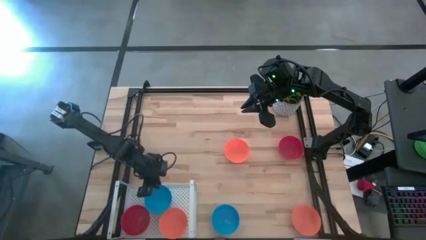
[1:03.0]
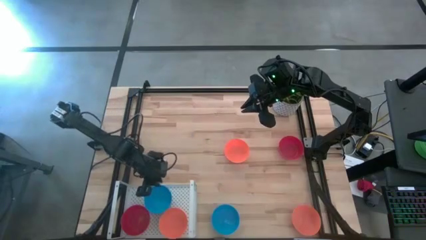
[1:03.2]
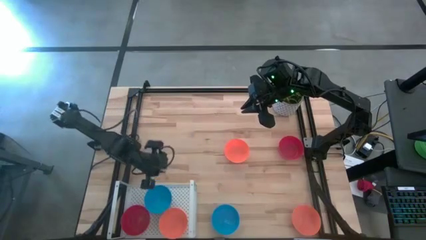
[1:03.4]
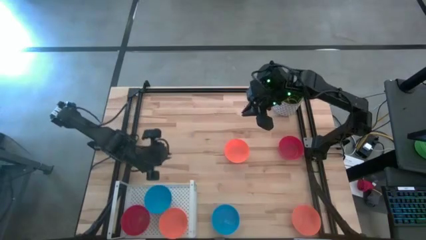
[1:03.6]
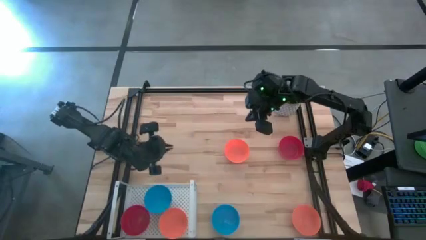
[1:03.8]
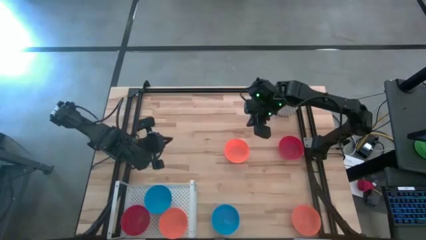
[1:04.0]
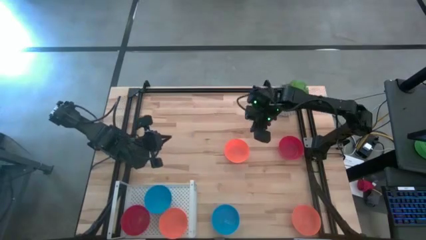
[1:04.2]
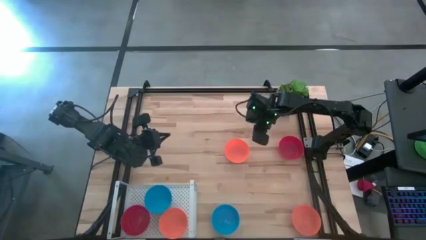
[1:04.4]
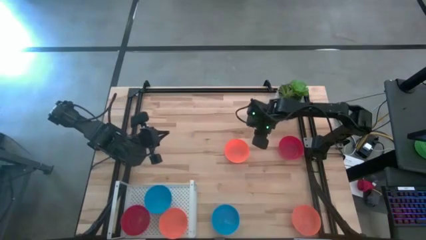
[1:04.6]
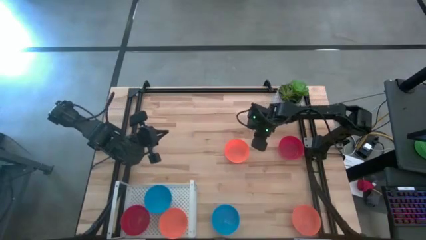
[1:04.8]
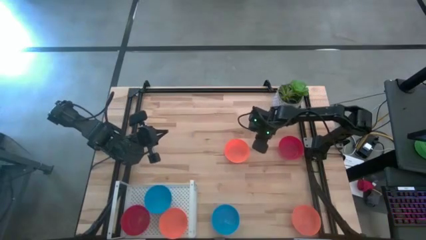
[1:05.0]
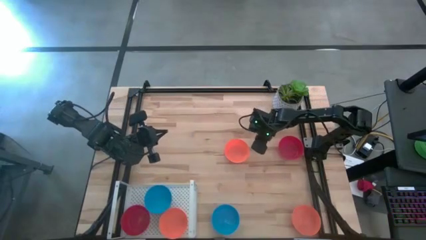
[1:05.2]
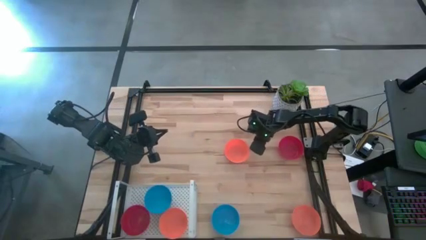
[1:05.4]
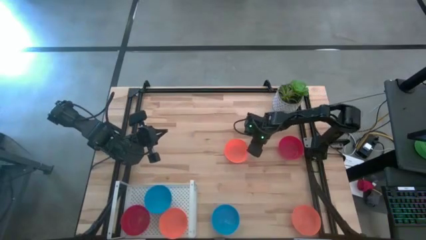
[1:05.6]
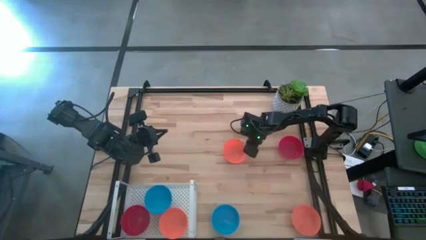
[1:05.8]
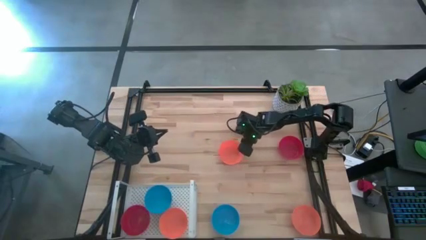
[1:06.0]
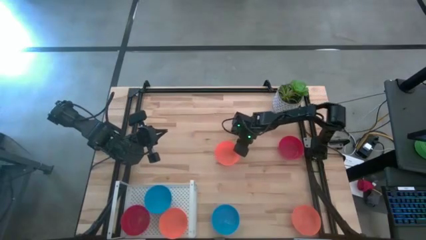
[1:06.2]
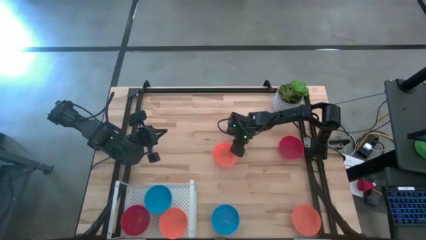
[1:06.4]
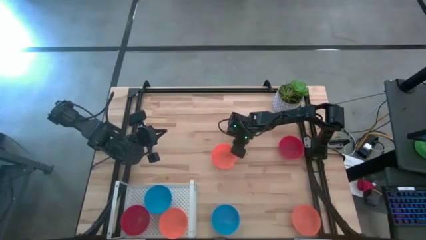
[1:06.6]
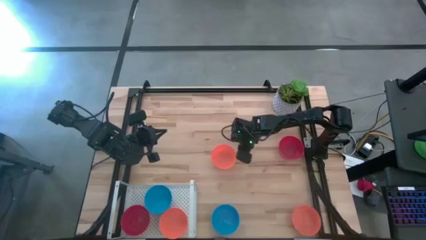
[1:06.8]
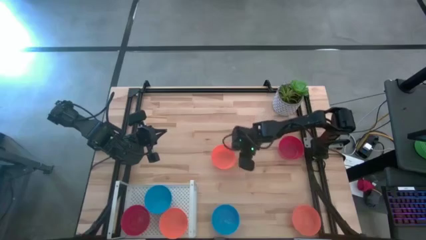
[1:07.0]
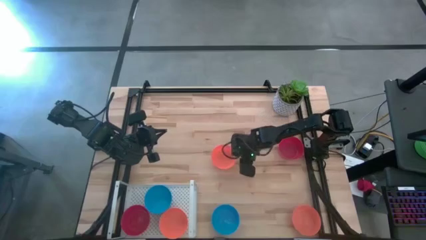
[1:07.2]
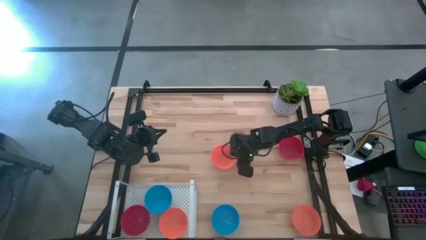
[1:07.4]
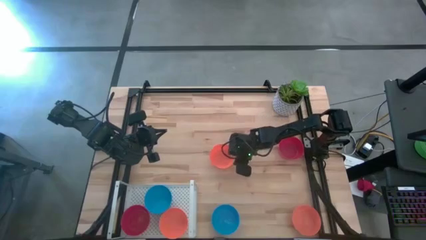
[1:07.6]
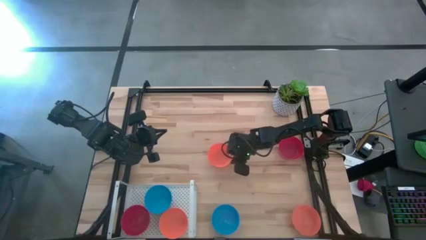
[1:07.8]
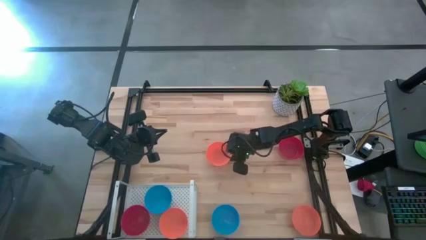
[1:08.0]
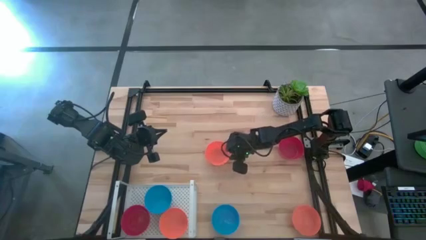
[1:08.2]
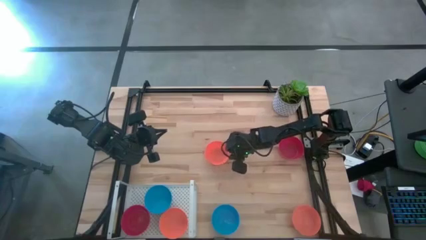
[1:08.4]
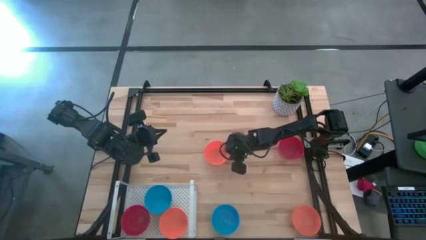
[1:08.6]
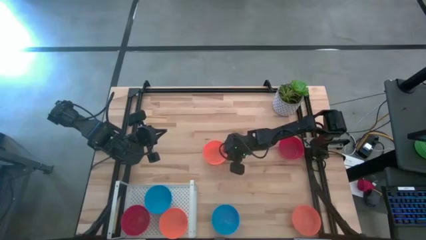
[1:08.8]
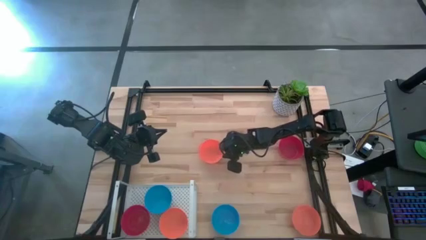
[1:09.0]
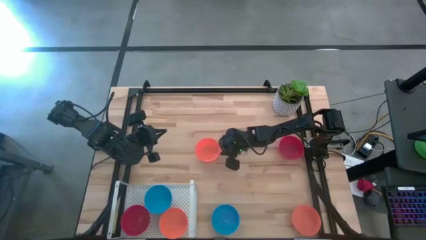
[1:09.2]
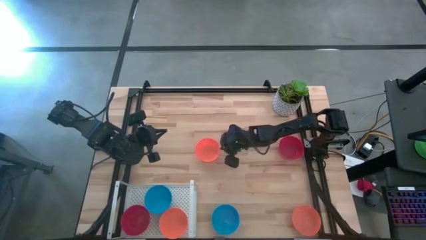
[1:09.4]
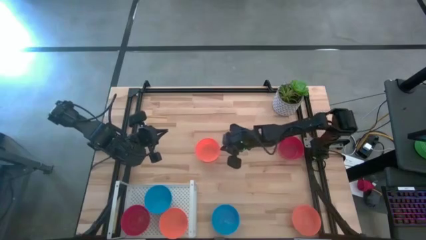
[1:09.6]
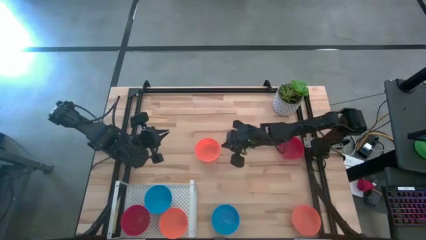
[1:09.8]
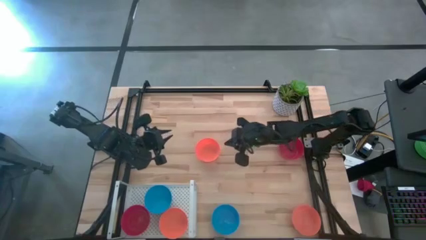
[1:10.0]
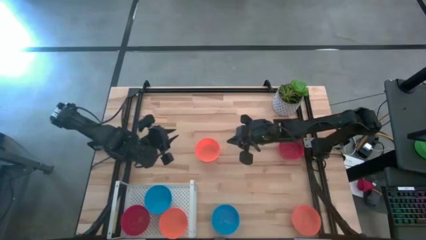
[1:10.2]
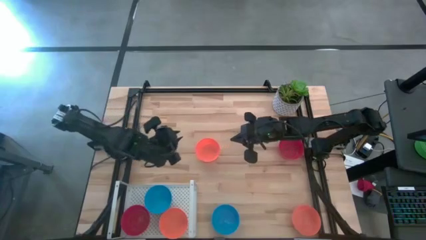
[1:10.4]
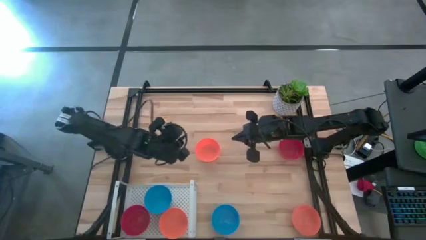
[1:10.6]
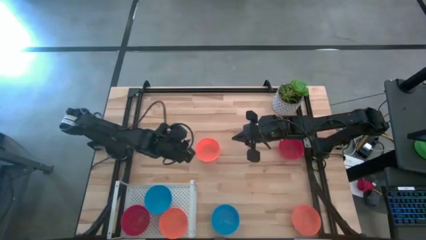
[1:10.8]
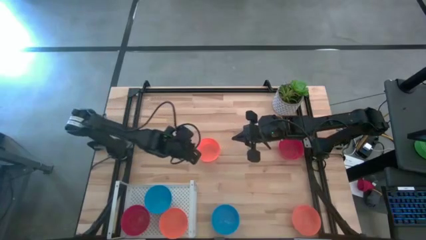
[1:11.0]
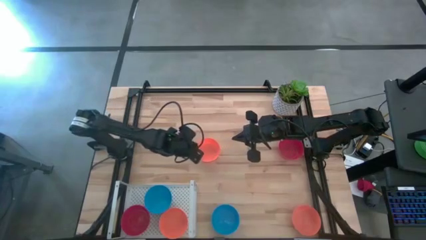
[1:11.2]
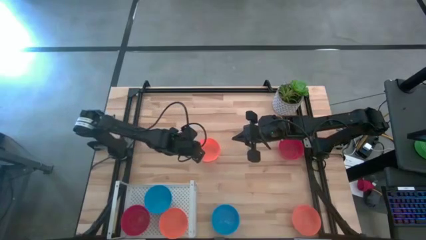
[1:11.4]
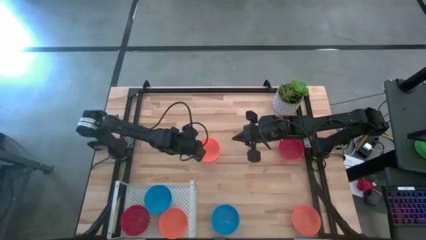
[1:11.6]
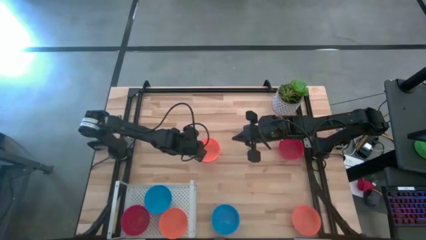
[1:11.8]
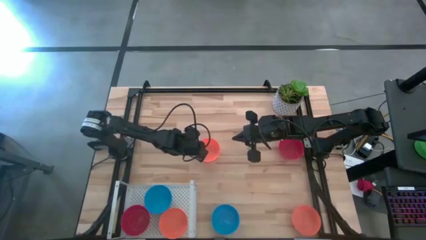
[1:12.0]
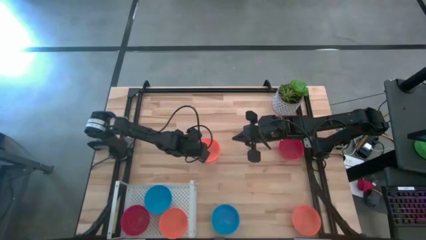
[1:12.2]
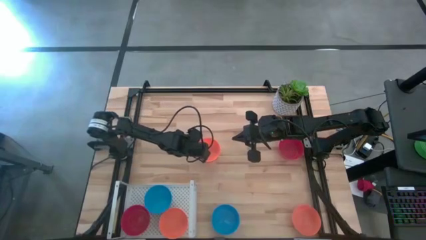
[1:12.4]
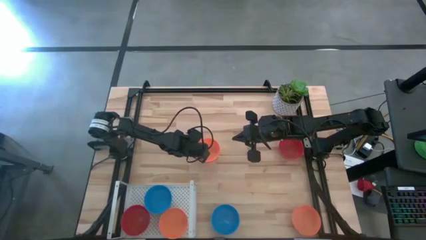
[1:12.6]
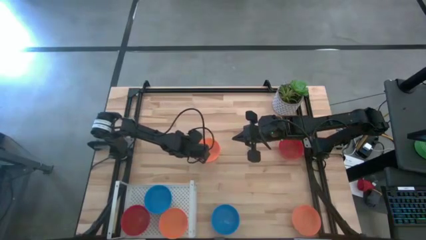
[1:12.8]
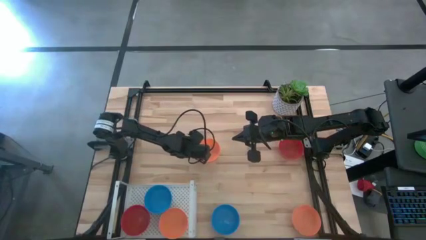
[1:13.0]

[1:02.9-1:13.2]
Task: Pick & Place Mini bowls
Stack the top orange bowl on top of the orange bowl on the shelf

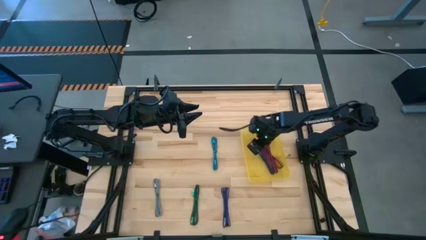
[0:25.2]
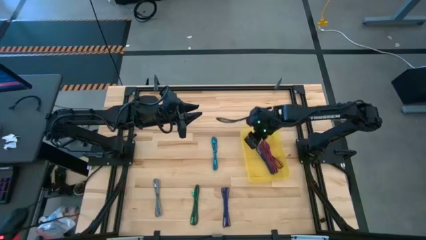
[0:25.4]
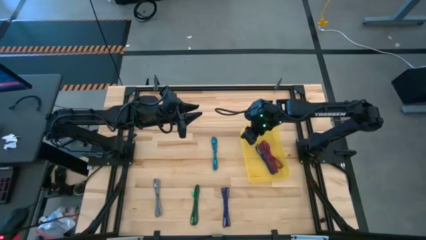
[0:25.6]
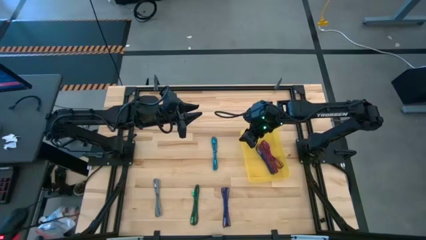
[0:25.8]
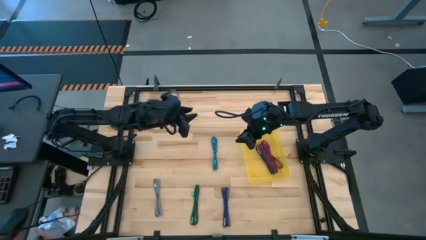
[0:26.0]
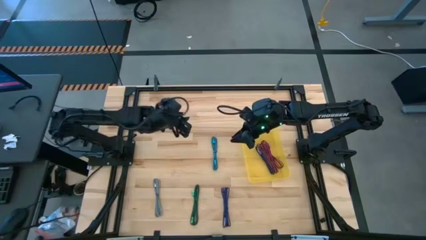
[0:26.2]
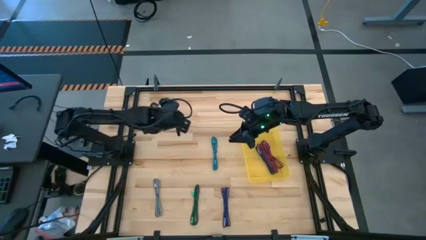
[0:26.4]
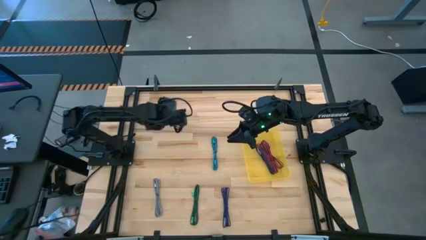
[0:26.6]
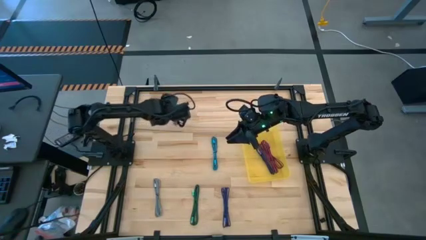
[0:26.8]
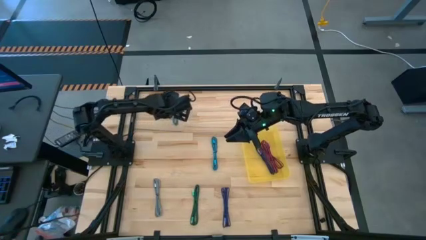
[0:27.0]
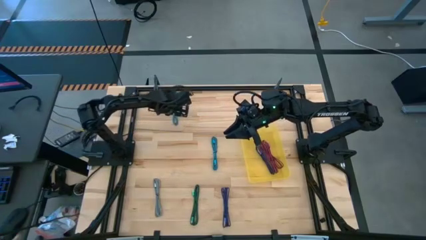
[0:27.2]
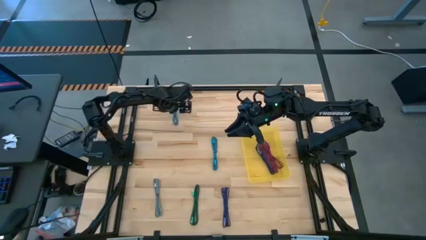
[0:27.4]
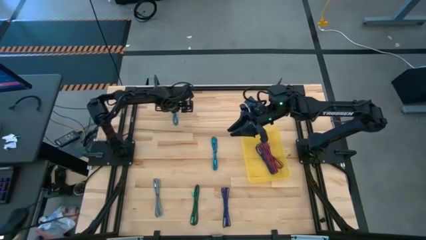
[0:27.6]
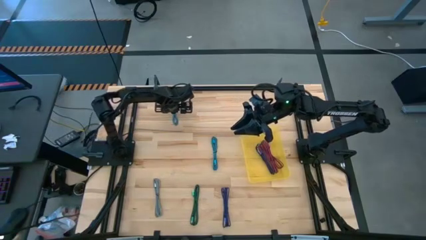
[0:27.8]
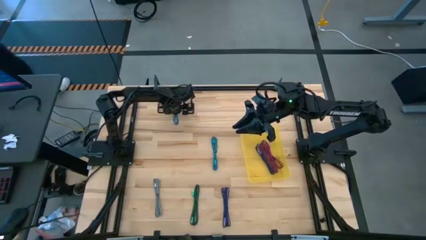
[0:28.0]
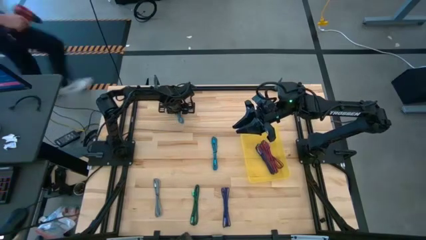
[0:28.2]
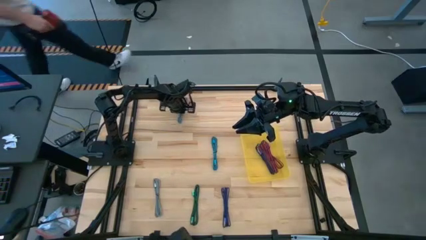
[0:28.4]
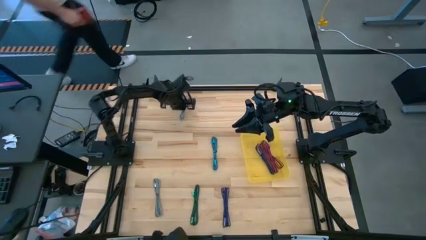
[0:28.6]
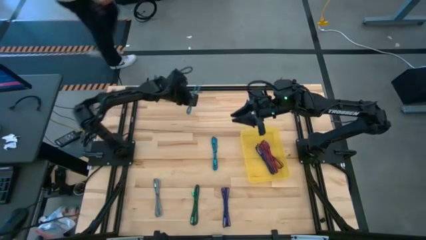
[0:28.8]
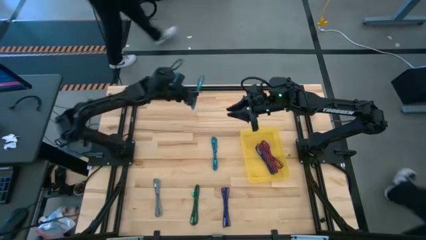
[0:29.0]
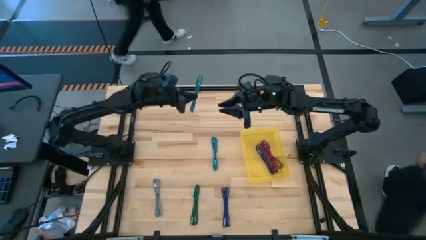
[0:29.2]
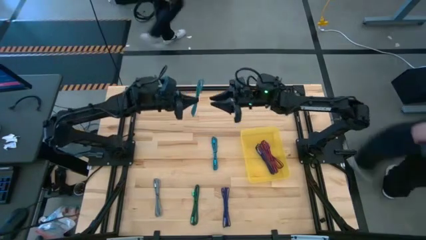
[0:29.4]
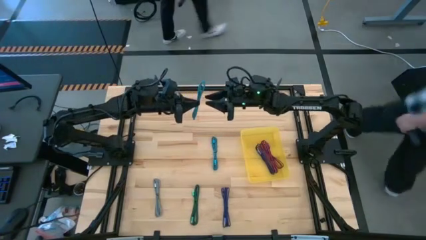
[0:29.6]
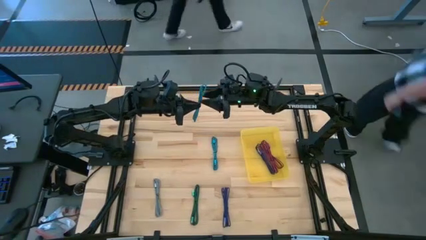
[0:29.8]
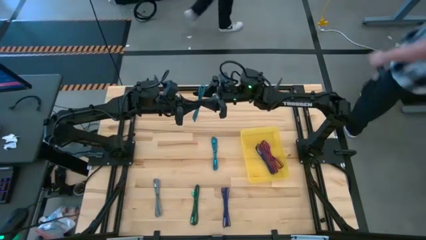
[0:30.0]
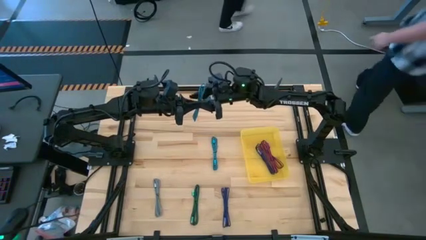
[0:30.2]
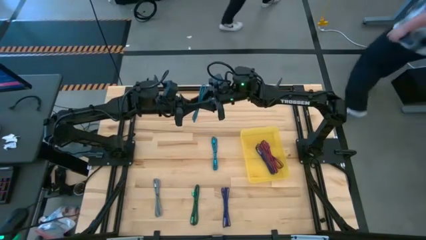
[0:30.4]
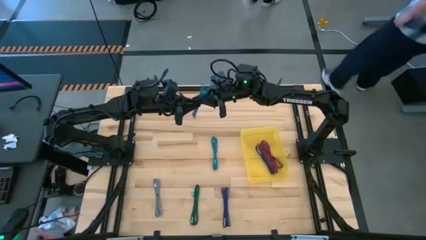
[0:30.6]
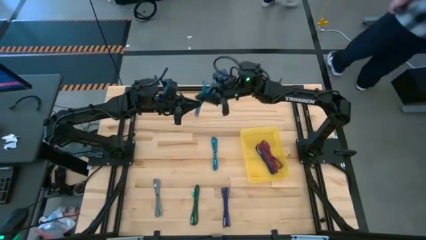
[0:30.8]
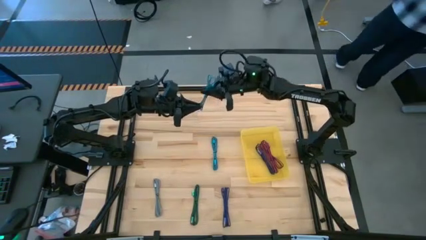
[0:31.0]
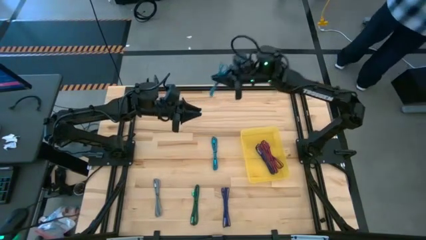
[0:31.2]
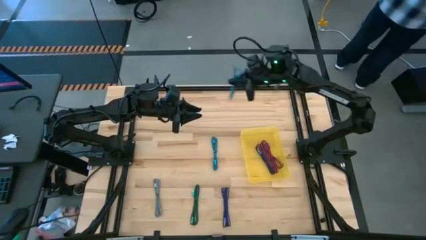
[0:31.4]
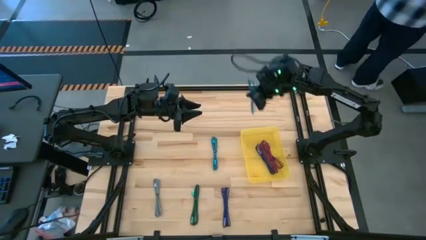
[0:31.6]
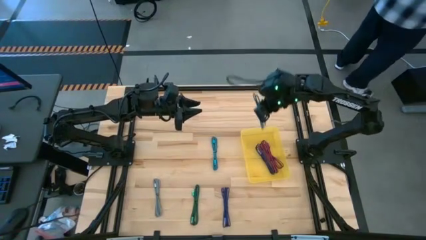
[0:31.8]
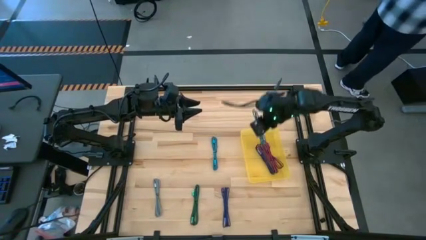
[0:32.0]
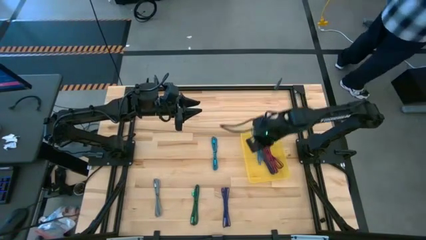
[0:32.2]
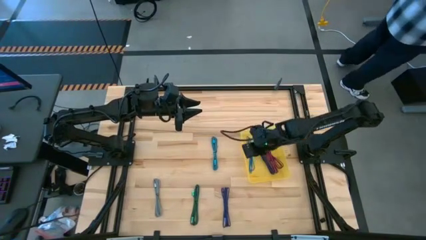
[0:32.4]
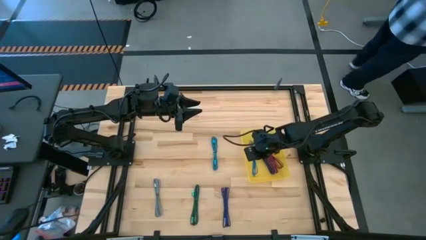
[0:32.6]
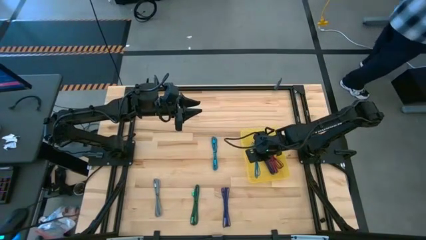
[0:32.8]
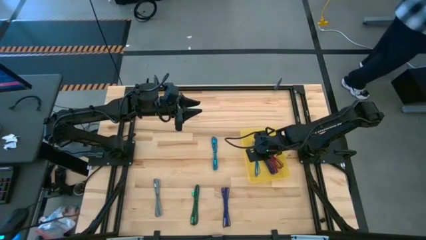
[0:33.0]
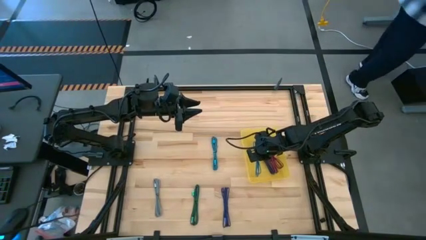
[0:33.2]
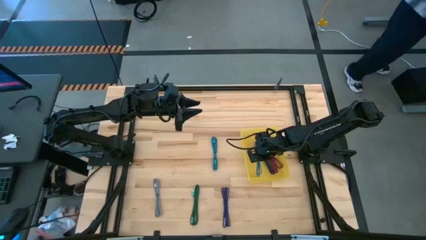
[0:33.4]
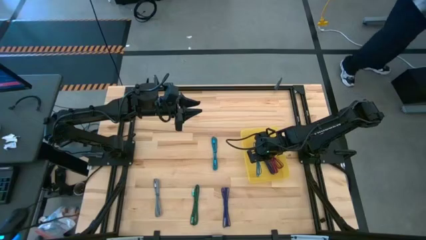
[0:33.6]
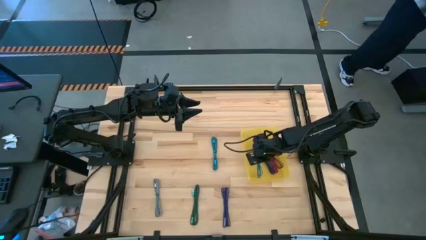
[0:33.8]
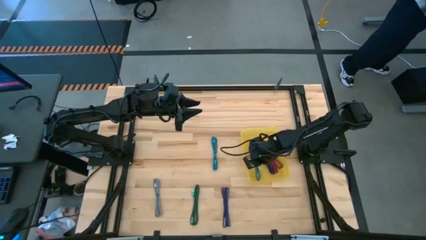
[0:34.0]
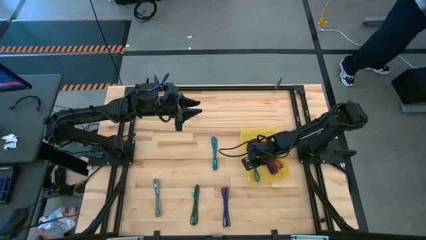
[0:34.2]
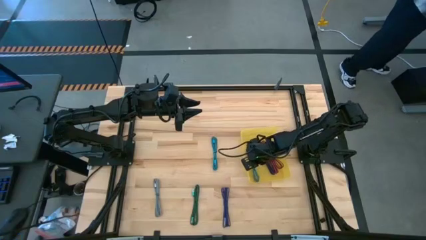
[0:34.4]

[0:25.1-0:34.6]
Task: Pick and place USB-C Cables
Put the top blue charger cable into the yellow bin
